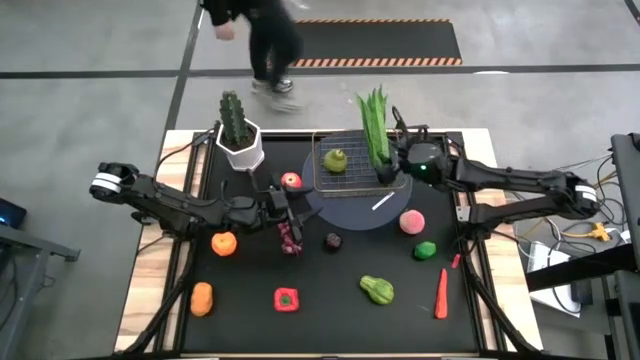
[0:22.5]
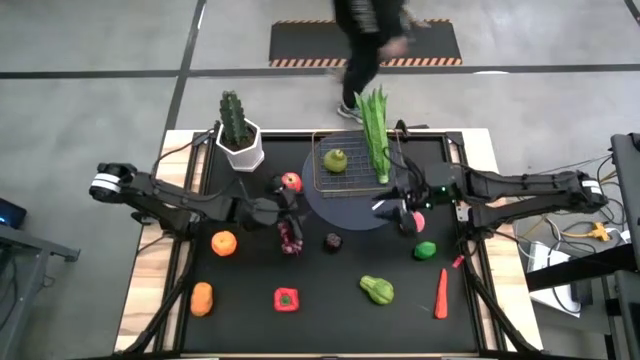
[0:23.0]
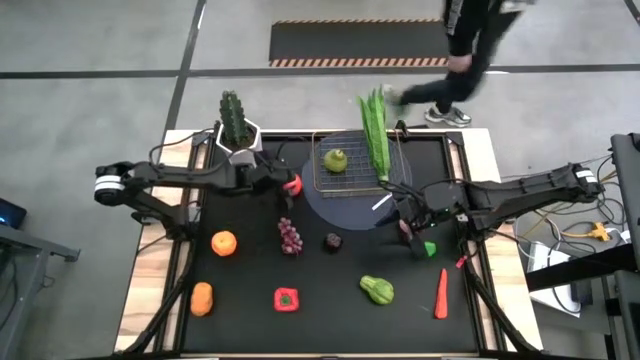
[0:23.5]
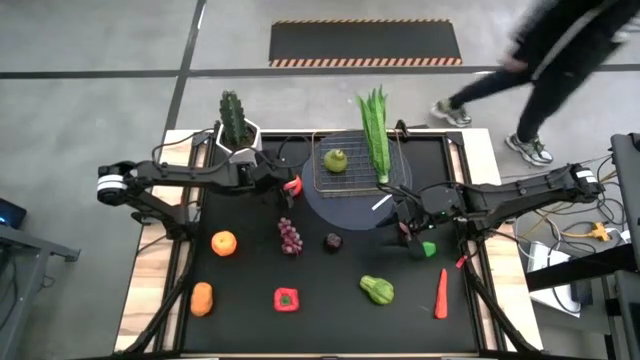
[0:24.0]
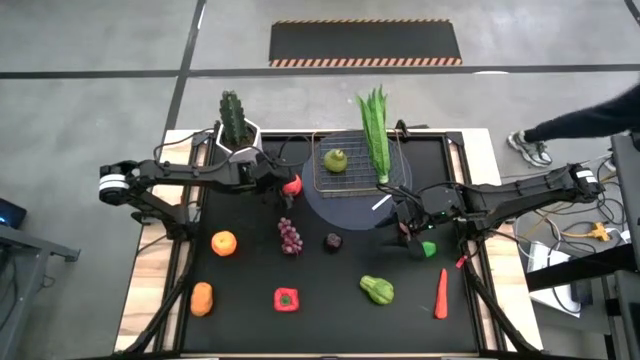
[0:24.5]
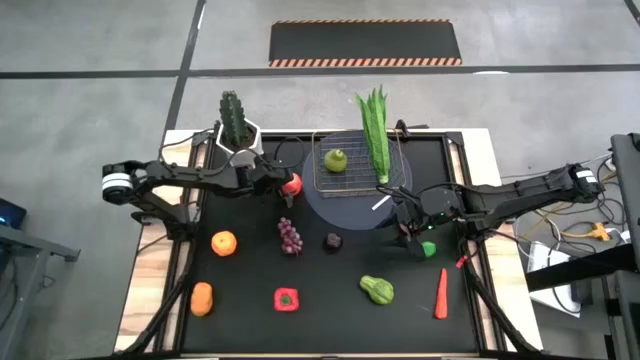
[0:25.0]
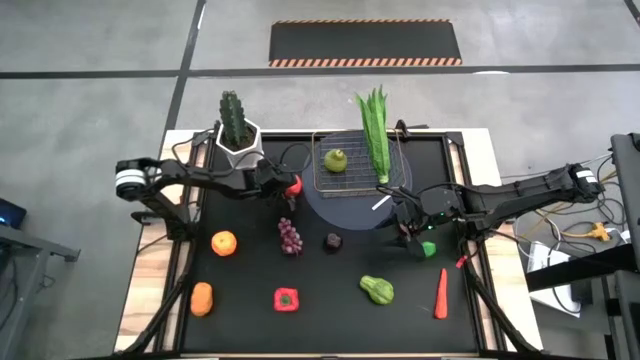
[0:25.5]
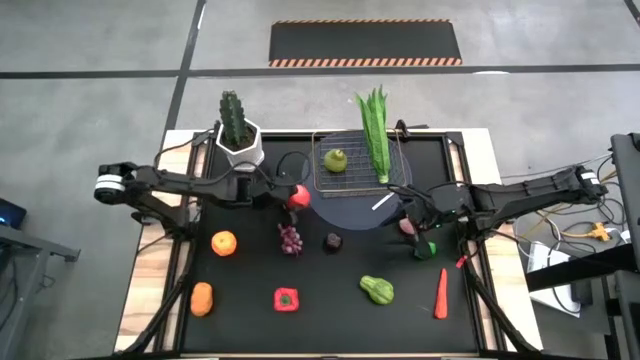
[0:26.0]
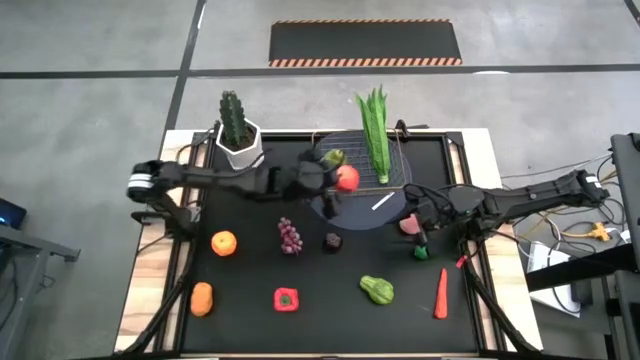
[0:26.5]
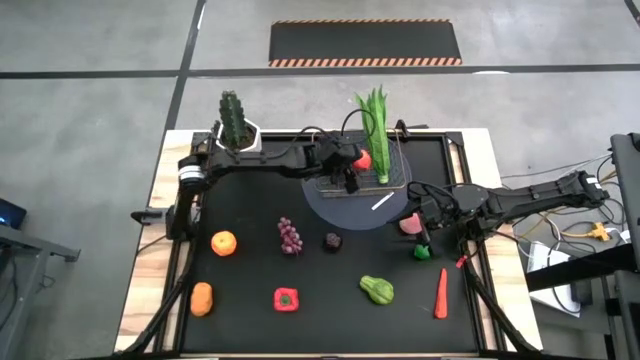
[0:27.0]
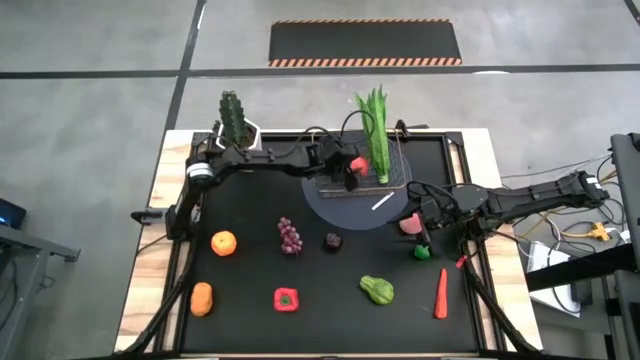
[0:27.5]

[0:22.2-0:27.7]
Task: Build produce basket
Put the red apple into the gold wire basket

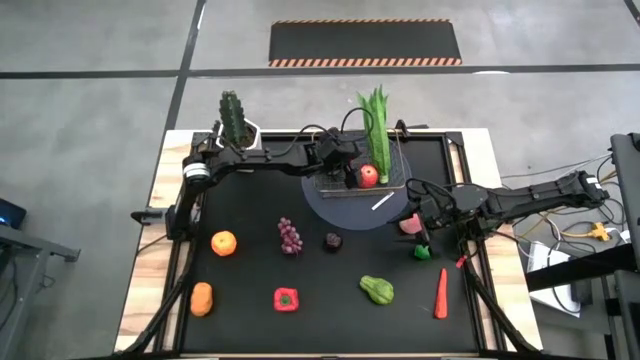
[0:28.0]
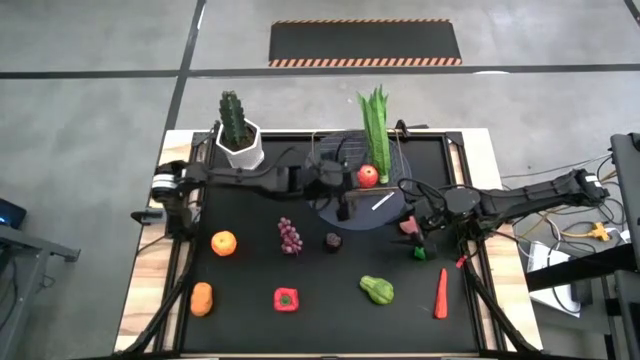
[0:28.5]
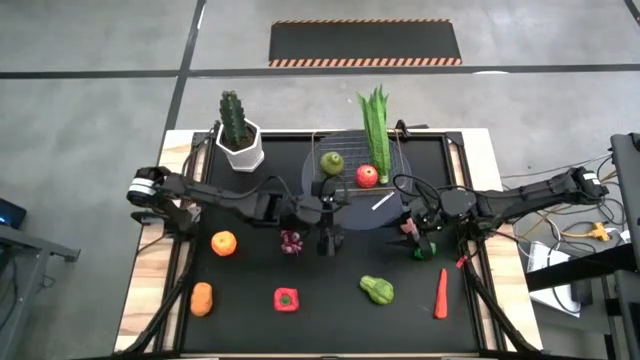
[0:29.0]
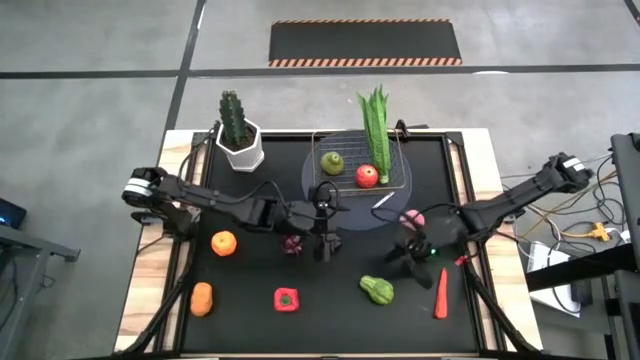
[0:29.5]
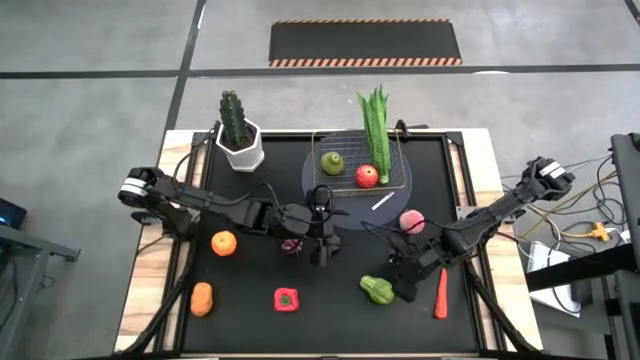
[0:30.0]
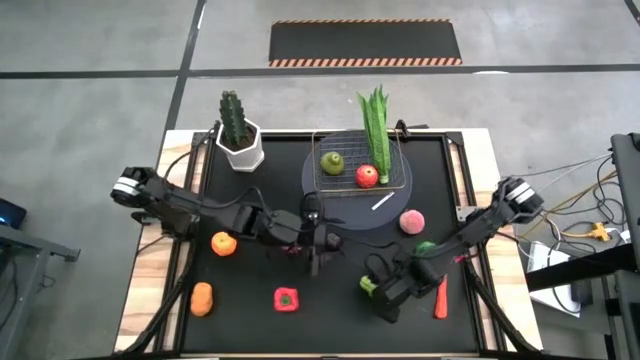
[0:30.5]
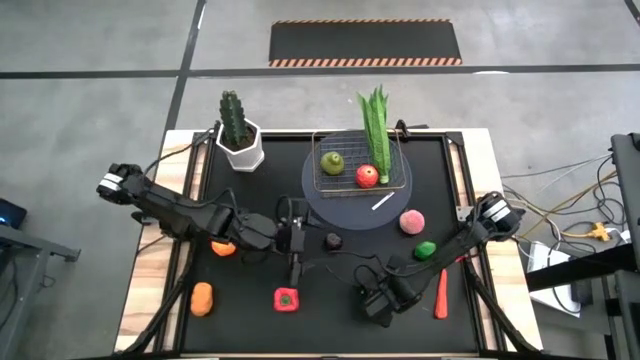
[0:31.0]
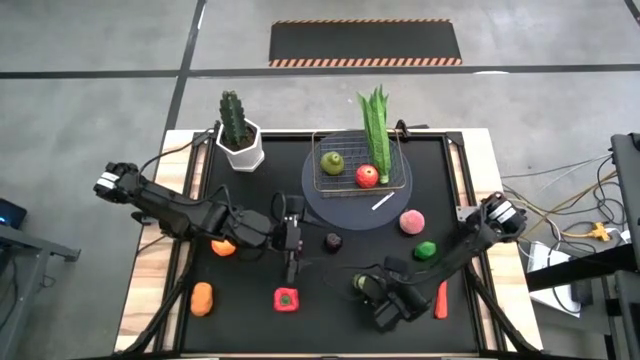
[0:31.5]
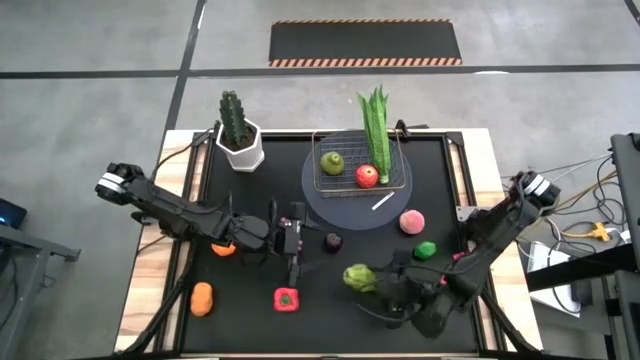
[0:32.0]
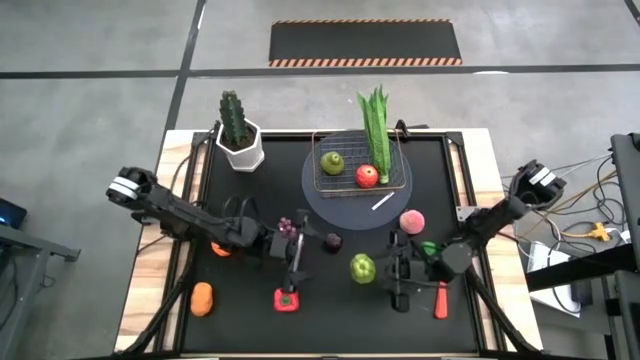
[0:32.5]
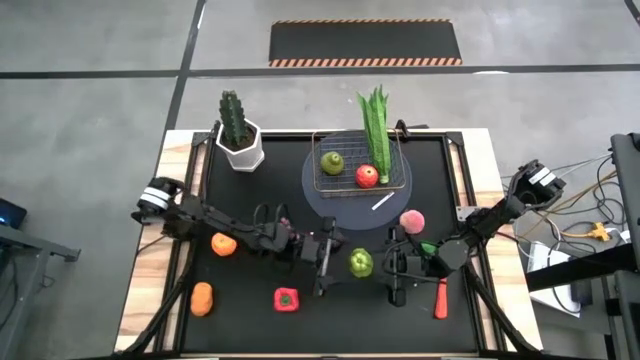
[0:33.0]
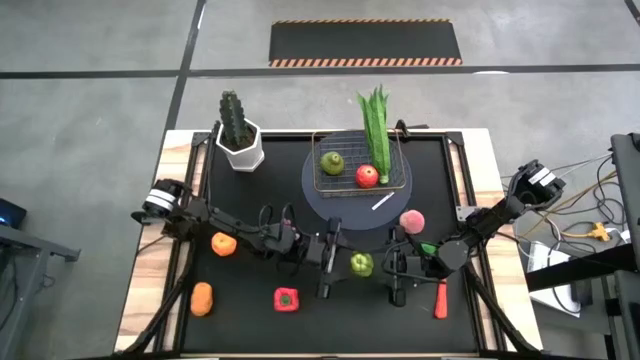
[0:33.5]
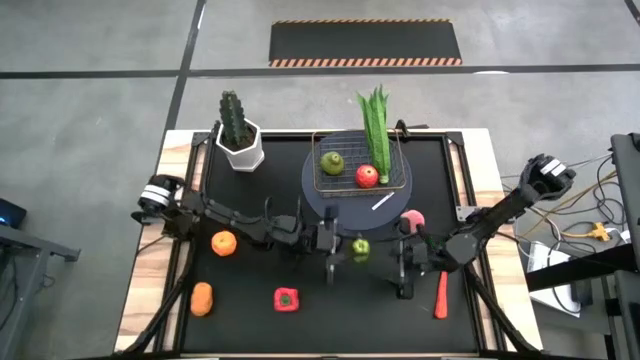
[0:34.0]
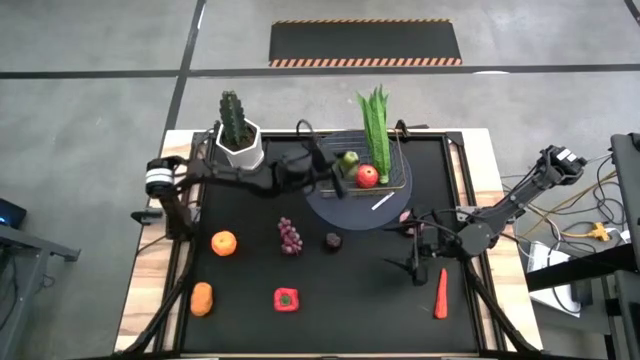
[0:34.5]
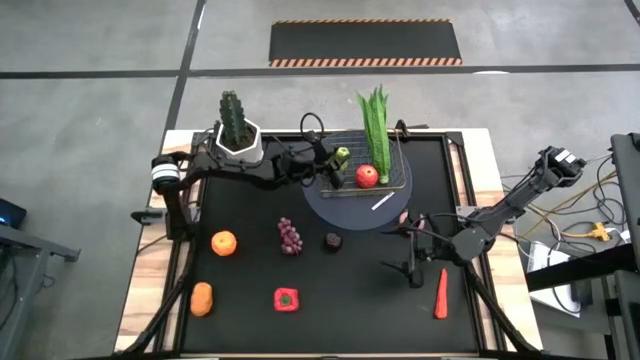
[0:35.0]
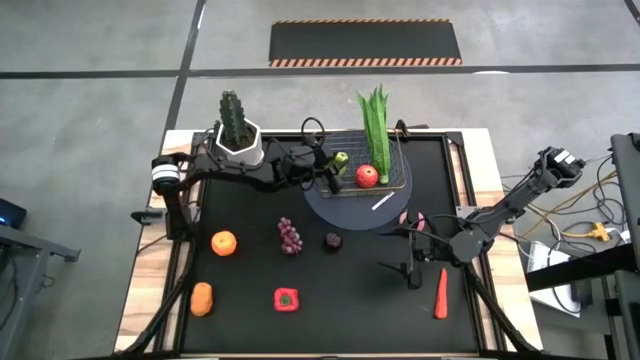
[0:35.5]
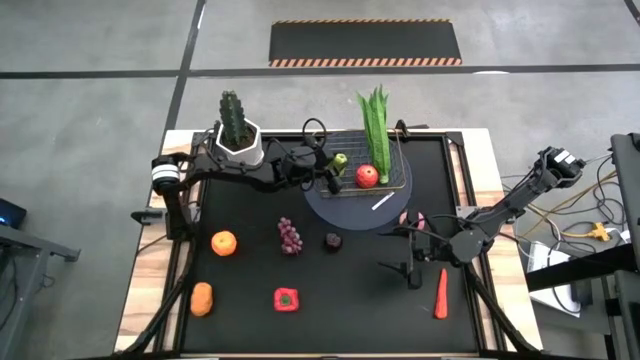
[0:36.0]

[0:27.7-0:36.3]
Put the green chayote into the gold wire basket

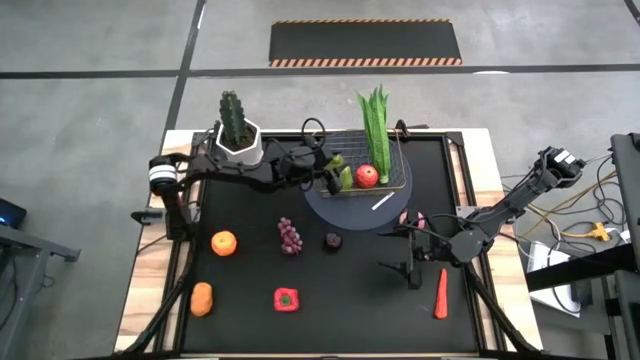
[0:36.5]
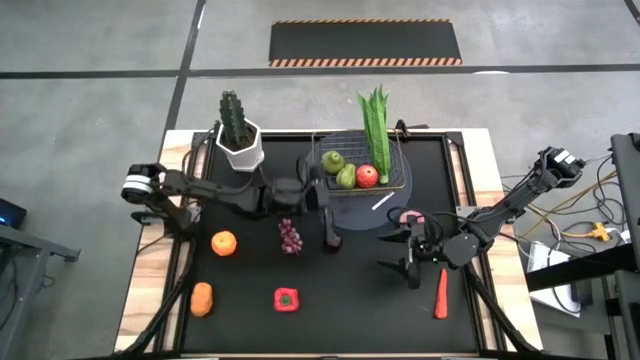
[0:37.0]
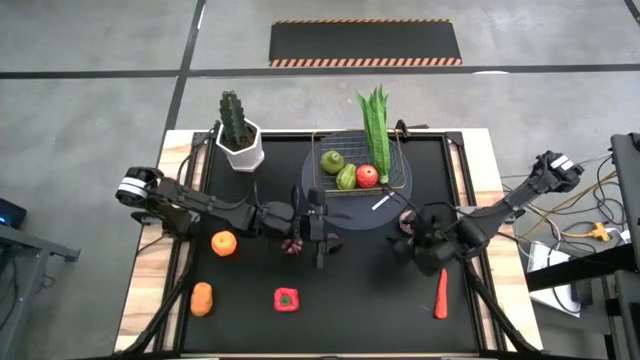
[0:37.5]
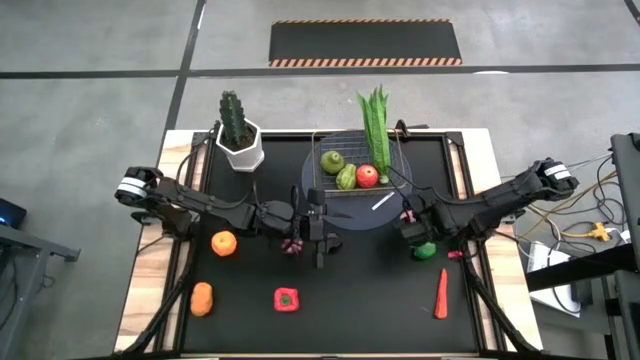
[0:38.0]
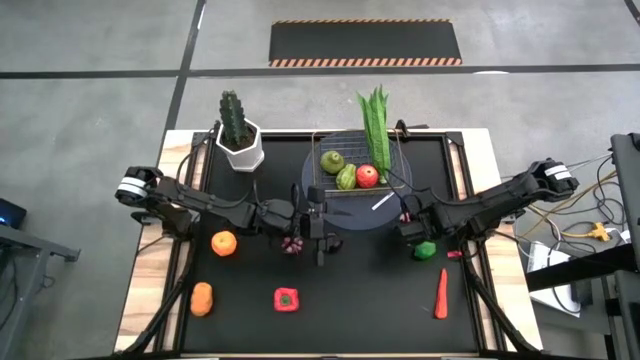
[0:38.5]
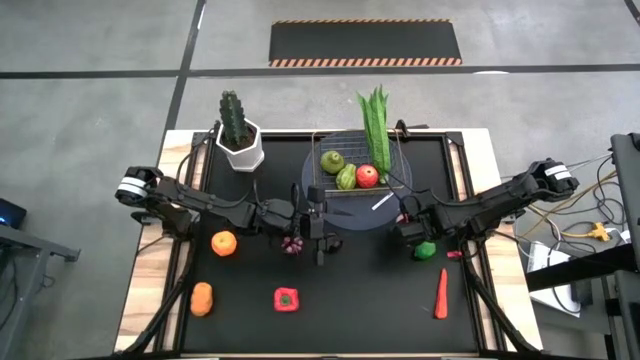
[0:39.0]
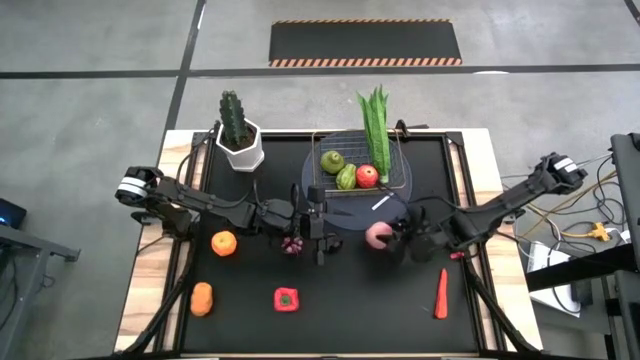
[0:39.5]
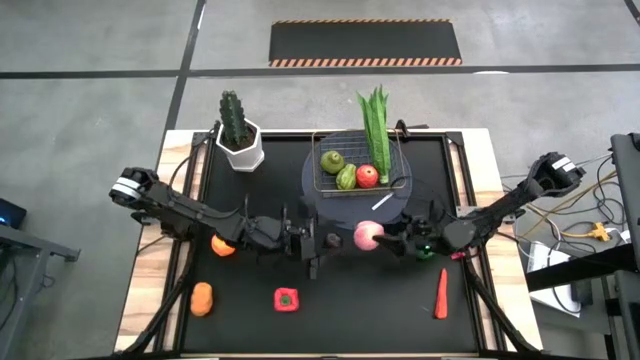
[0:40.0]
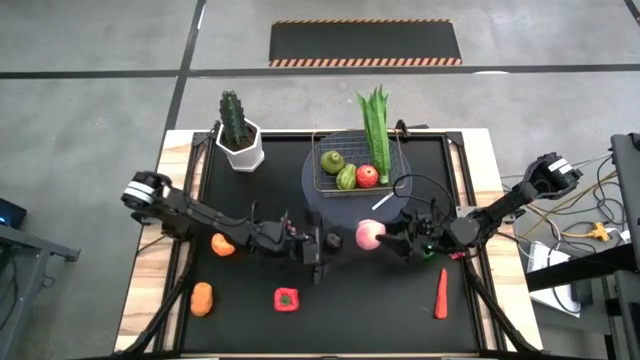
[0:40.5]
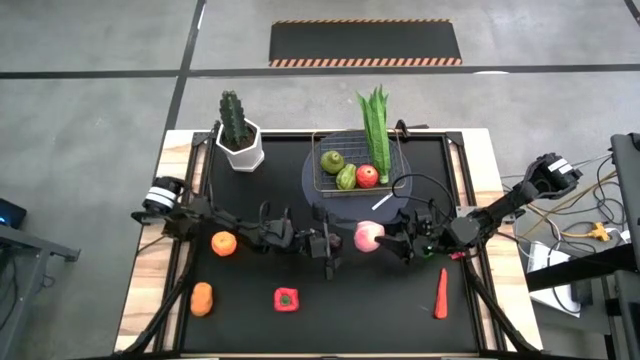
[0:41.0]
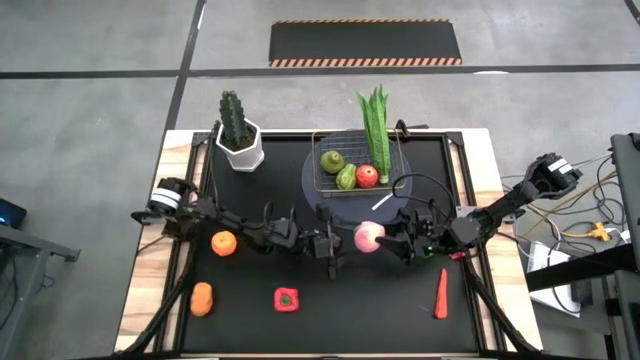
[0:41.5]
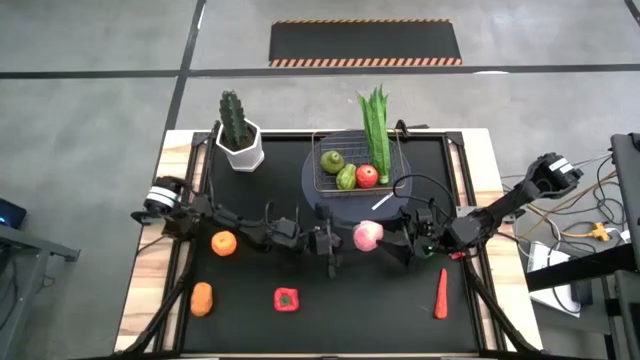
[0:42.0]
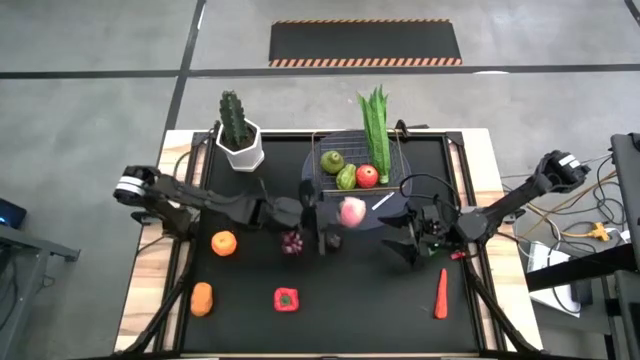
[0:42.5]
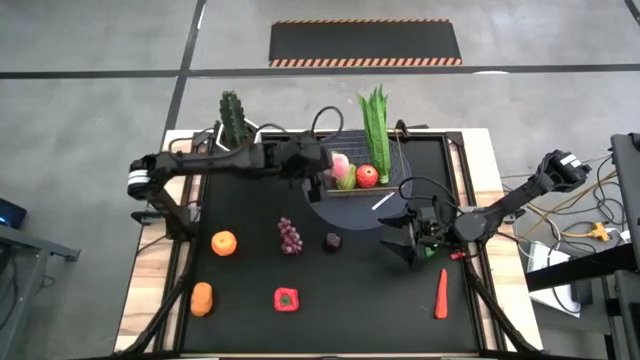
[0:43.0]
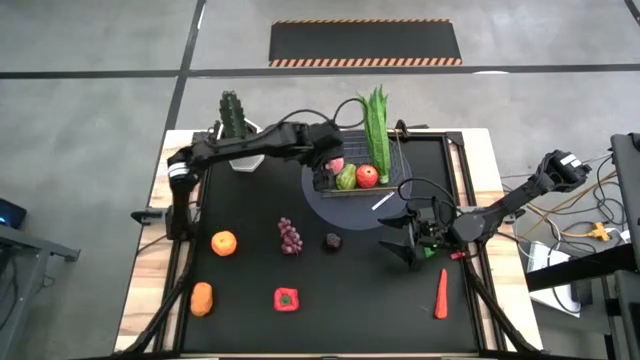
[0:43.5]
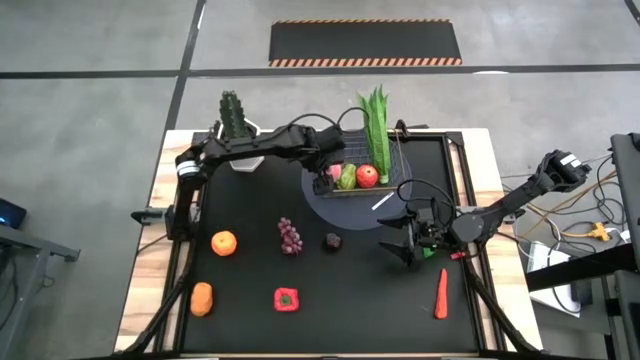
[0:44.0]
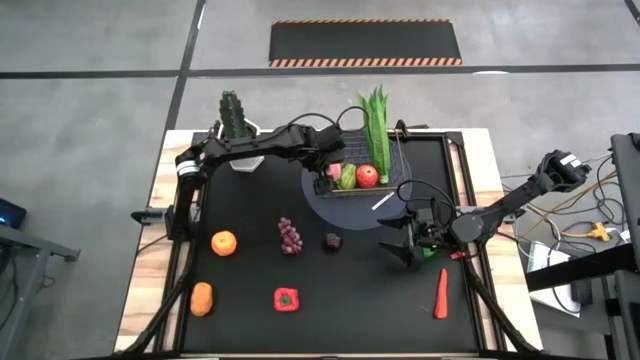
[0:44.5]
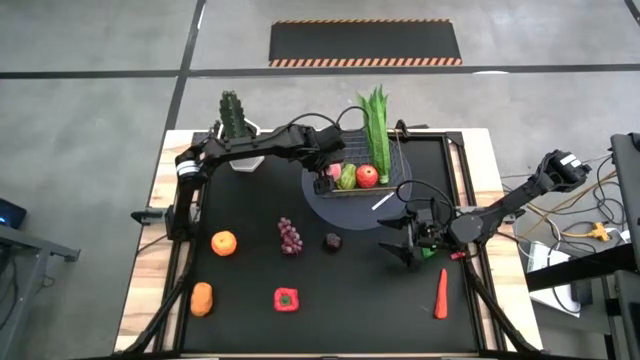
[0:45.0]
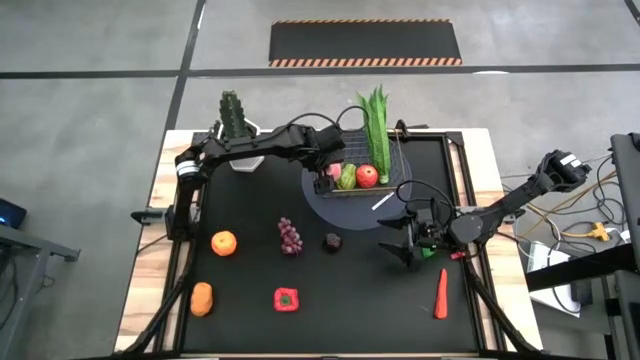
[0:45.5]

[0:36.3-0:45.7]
Put the peach into the gold wire basket
